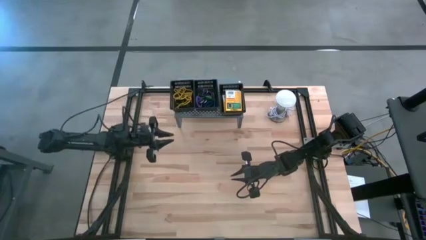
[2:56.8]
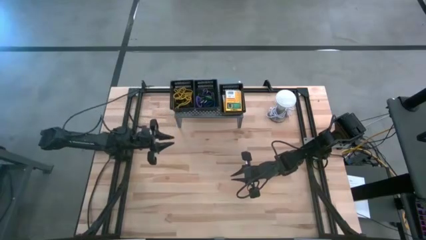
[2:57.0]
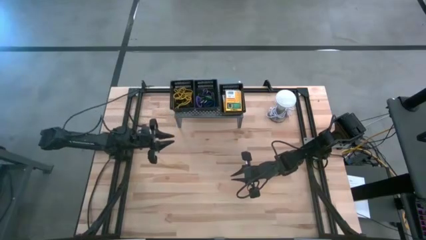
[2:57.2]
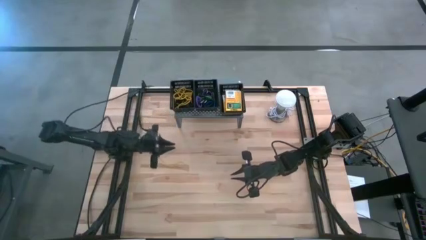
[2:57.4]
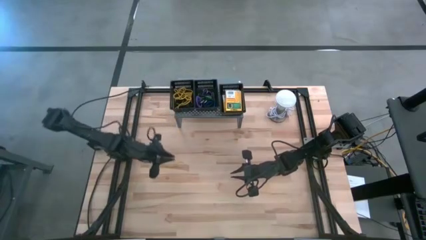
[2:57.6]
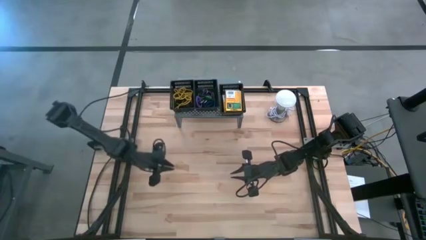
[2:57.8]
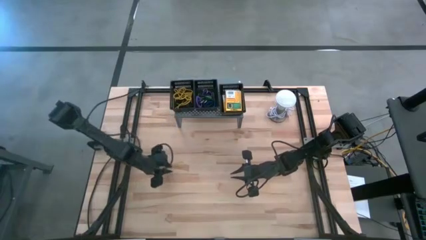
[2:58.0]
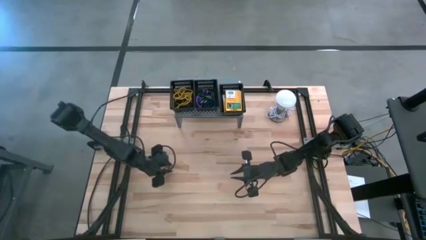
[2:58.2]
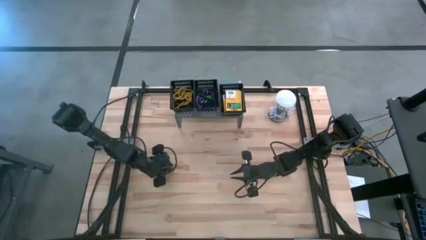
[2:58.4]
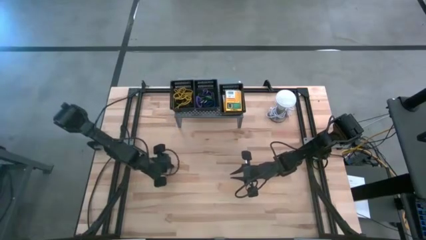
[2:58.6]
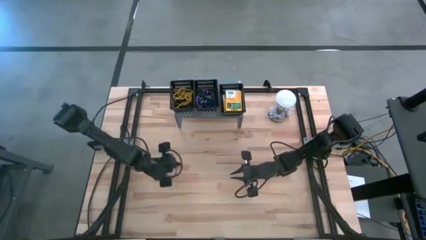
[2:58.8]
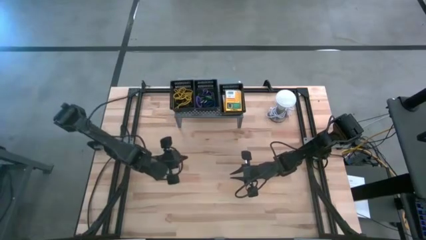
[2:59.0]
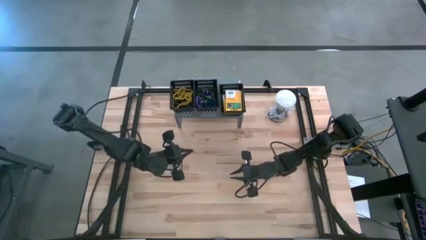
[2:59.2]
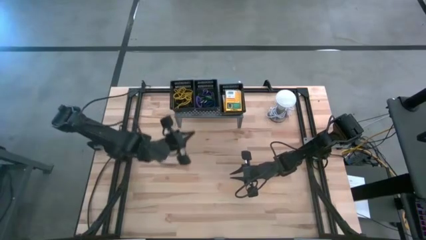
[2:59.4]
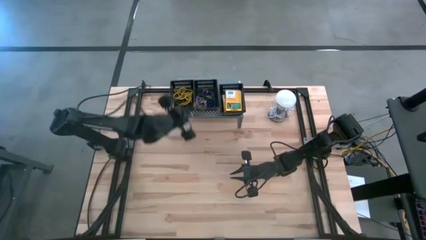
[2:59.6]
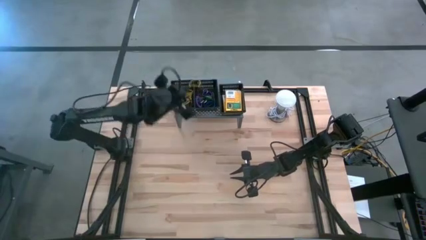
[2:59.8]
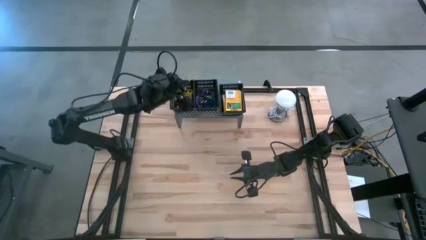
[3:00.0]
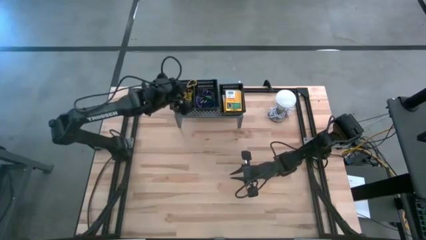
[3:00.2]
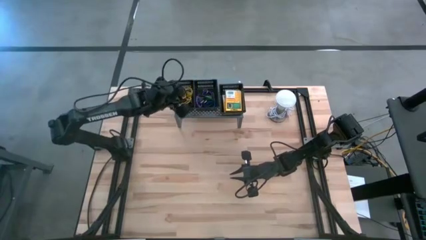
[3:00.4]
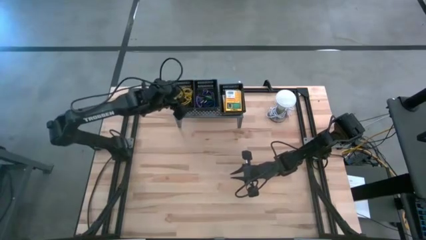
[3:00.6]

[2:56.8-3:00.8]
Task: Pick & Place Office Desk Supplies
Put the yellow rubberband into the left black bin on the shelf

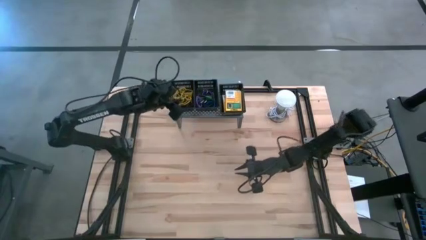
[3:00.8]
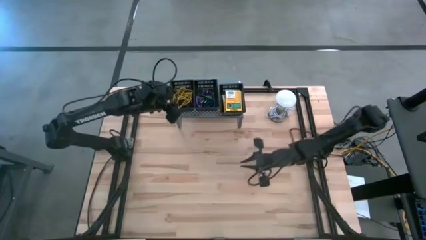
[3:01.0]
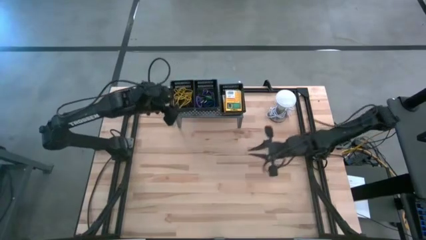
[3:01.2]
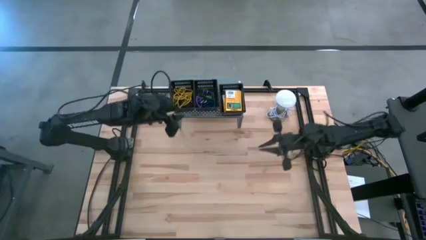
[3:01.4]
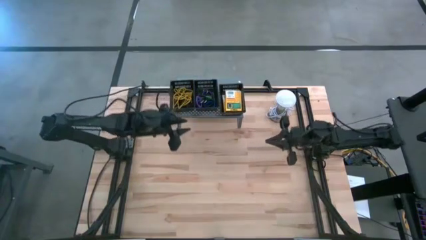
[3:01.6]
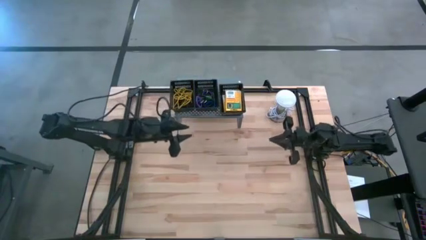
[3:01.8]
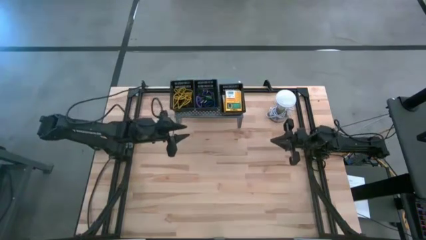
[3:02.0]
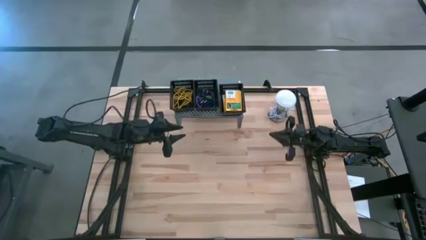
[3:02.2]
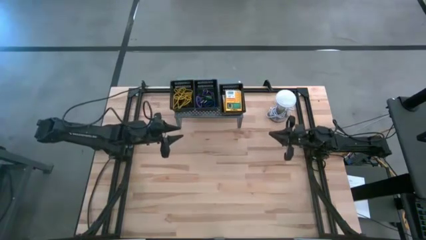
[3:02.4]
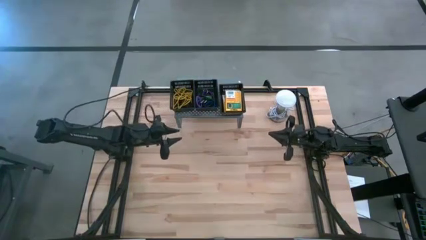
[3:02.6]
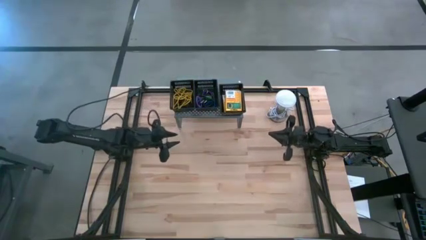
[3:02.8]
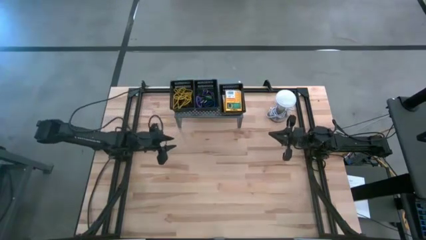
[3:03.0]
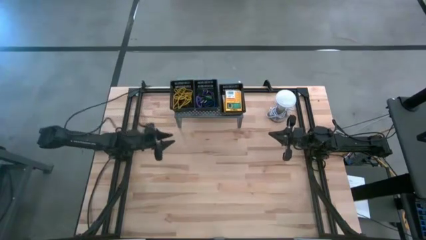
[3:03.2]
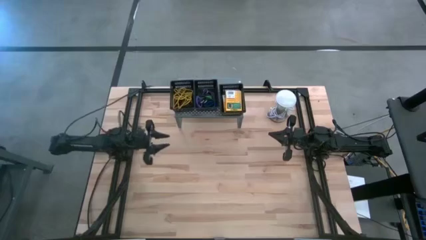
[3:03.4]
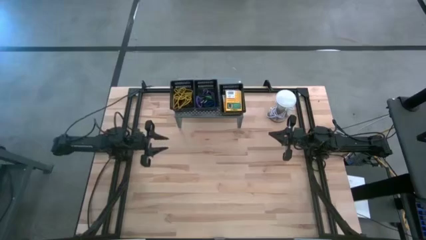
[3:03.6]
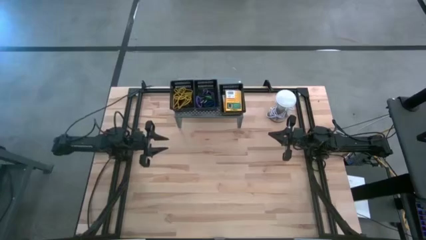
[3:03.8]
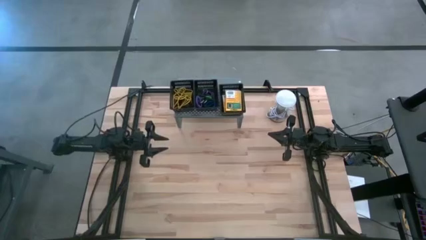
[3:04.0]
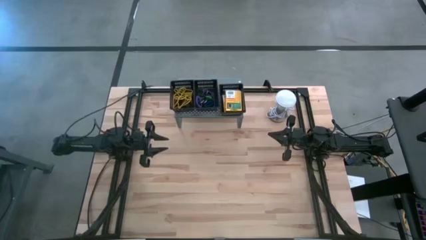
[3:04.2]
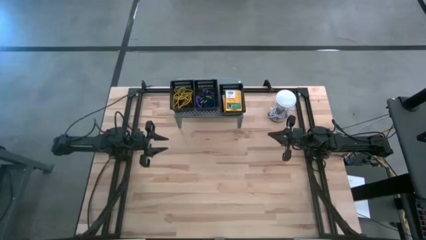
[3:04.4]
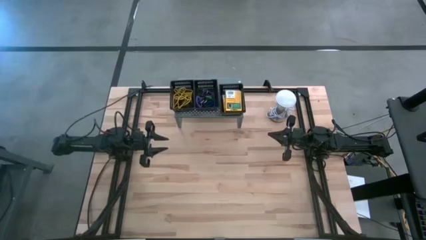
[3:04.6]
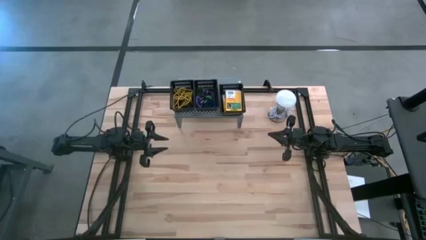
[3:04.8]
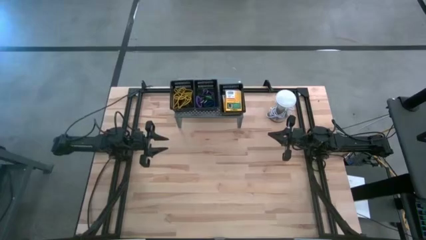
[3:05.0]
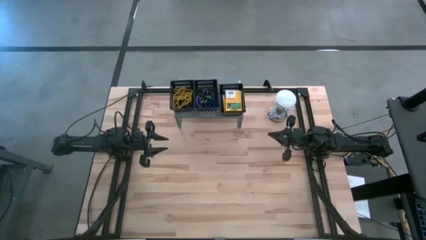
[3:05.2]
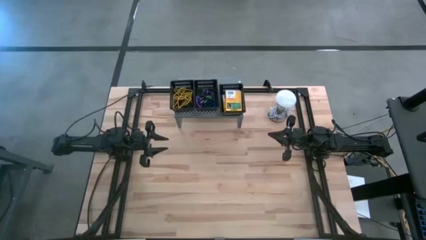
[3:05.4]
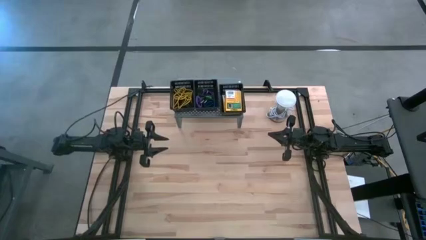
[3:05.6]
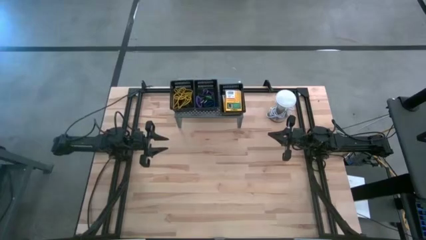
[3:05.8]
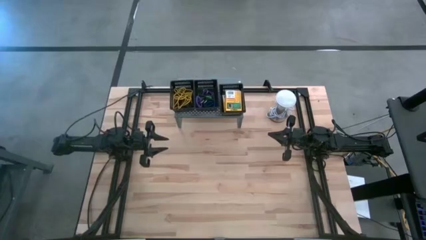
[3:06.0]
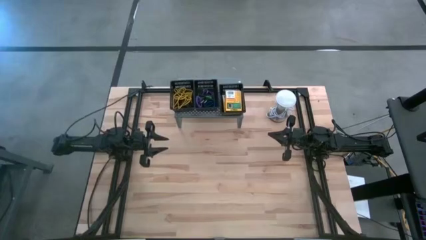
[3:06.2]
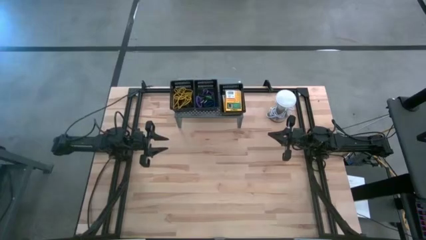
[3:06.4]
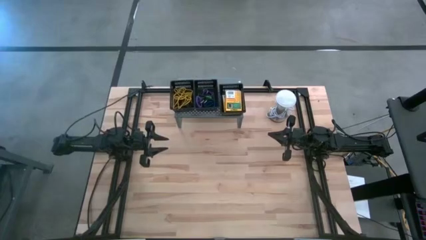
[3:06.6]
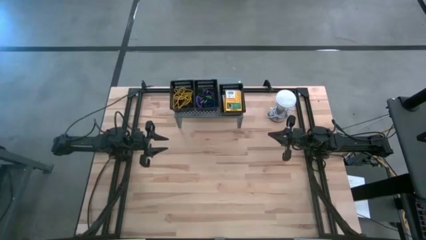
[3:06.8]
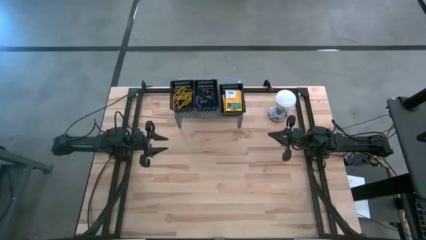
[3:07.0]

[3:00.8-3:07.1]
Return to Home Position

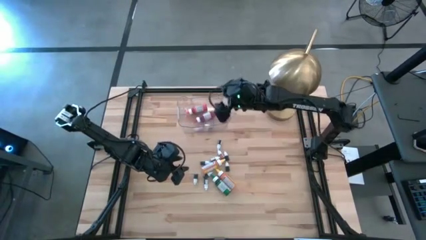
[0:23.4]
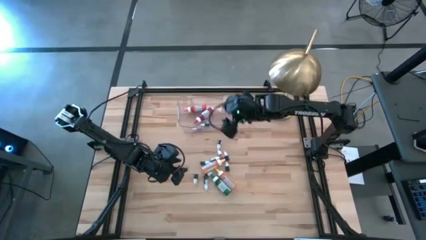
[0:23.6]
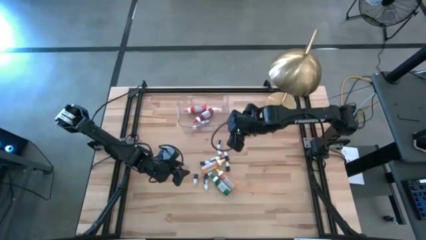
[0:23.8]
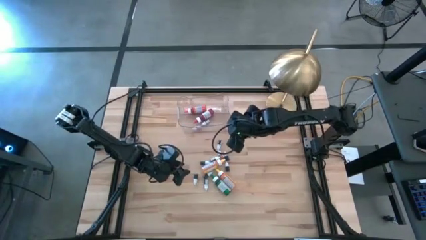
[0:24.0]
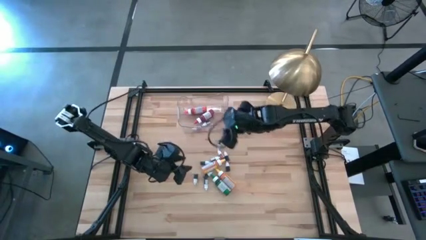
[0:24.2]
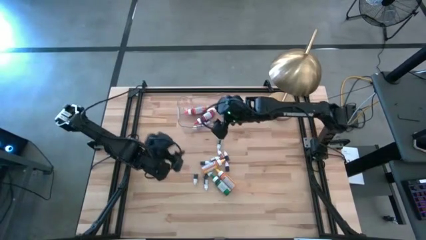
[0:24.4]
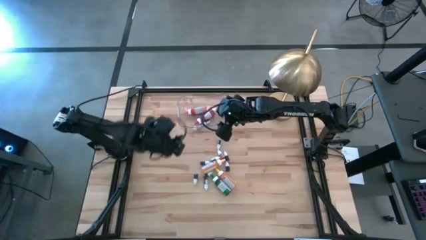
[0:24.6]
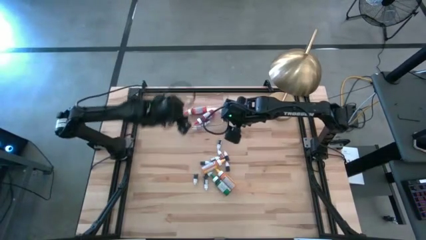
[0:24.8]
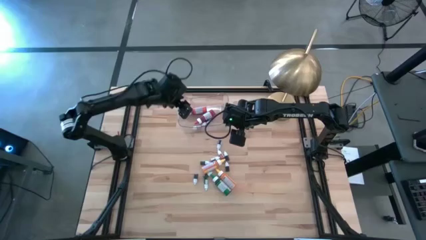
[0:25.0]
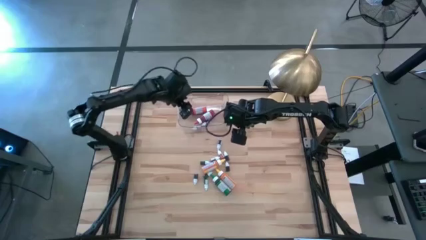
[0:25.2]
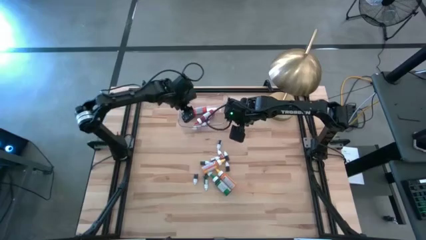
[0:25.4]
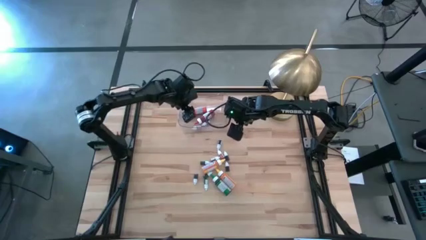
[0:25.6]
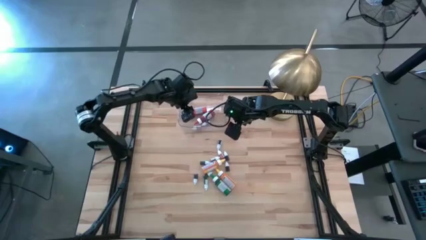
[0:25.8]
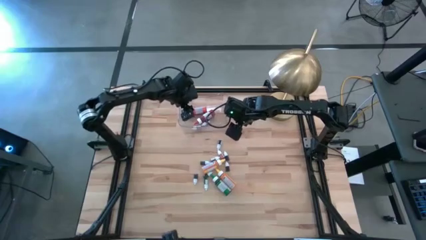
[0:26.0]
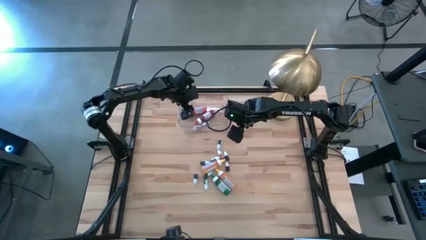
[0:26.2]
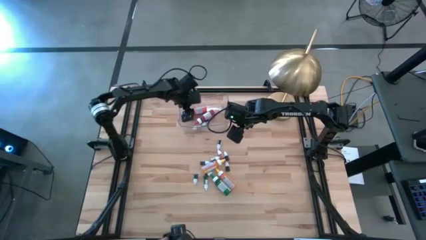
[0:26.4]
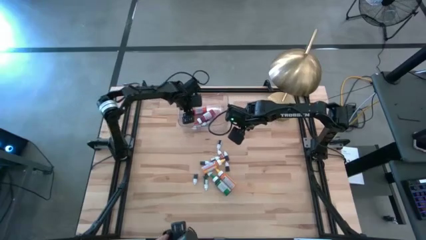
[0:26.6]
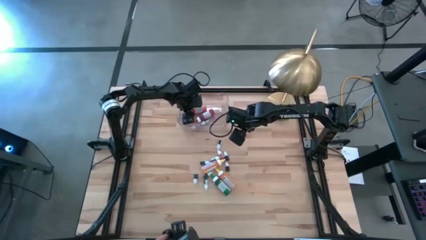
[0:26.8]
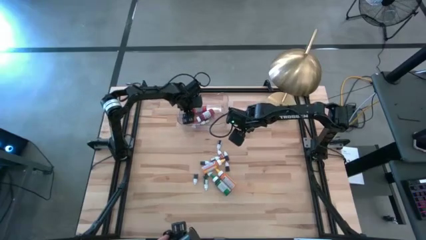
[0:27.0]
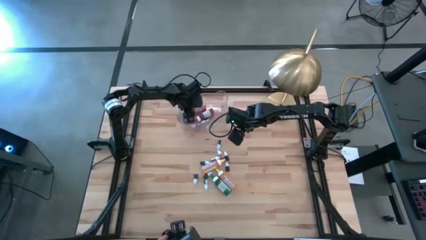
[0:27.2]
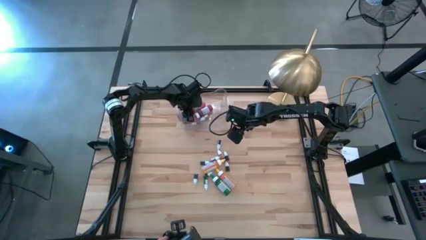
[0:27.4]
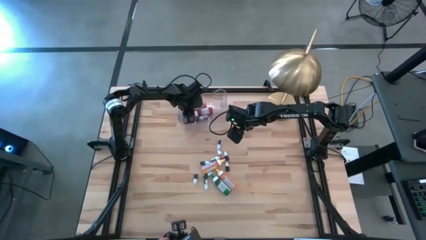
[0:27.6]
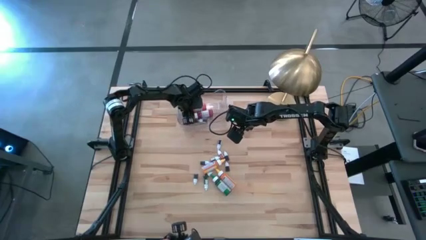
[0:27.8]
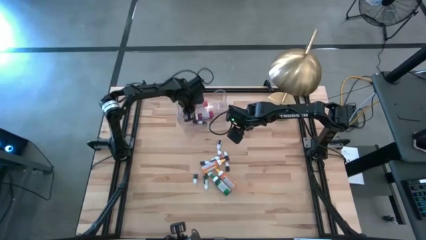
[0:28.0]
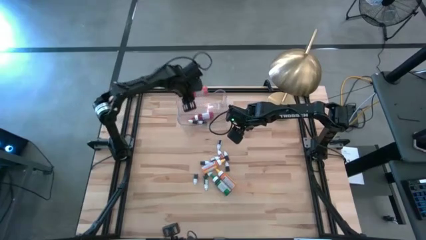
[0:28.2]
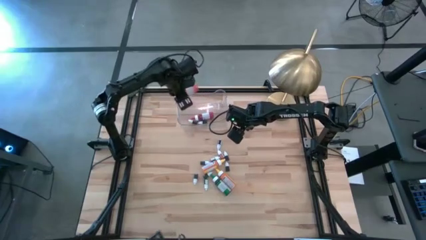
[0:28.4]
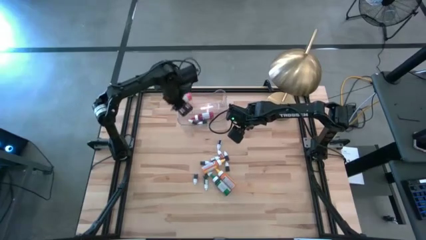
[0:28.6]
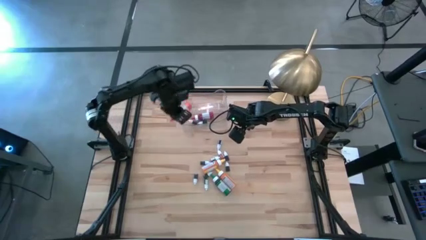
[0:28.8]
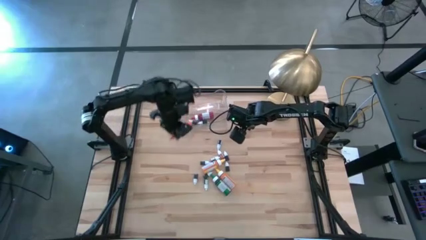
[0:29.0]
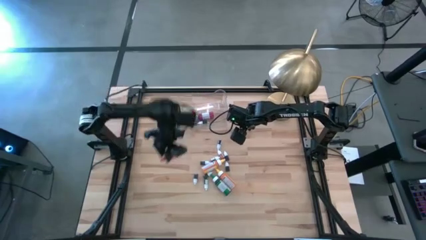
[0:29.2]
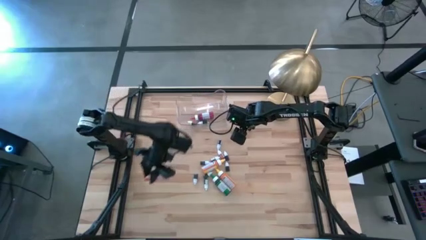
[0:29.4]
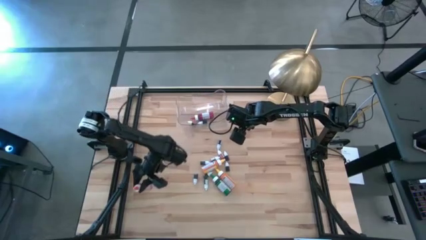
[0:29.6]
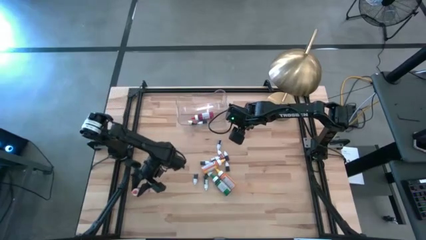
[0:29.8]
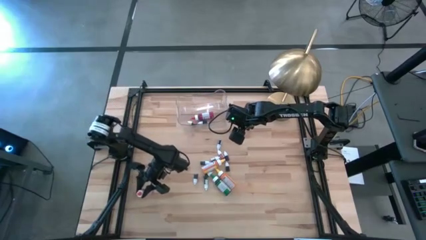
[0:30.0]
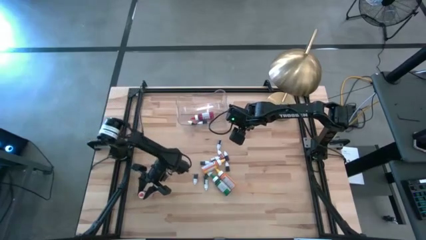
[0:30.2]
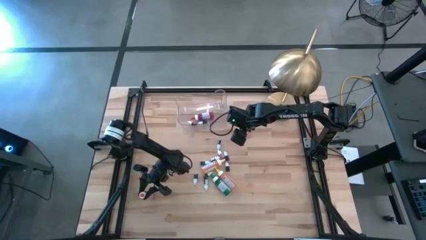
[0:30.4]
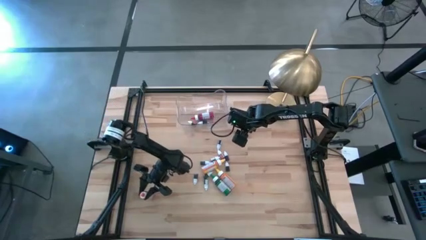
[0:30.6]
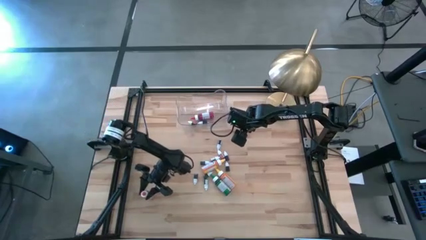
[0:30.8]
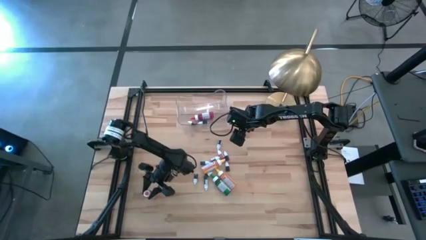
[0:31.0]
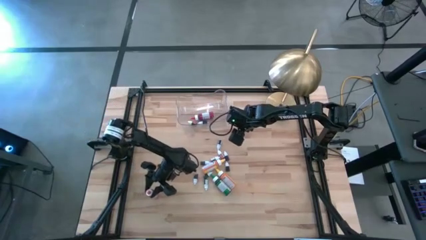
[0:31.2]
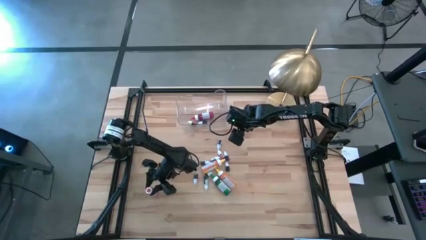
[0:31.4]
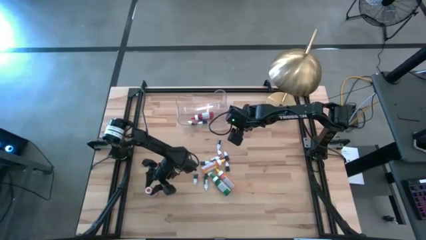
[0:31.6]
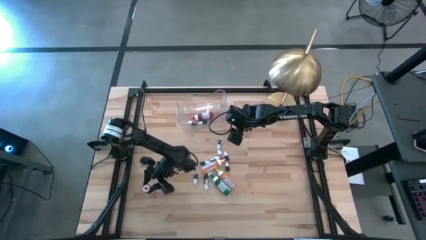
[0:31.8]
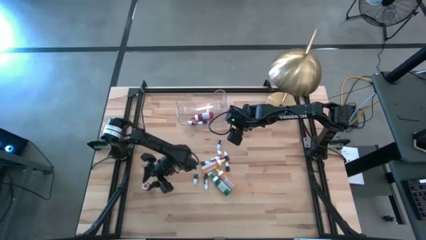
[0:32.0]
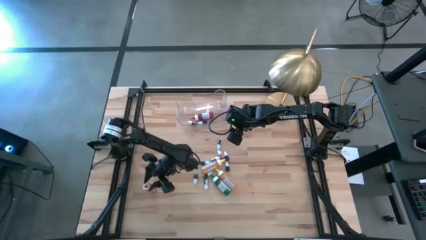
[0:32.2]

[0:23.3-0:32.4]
Task: Pick & Place food coloring
Remove the large orange food coloring bottle from the transparent bin to the table
